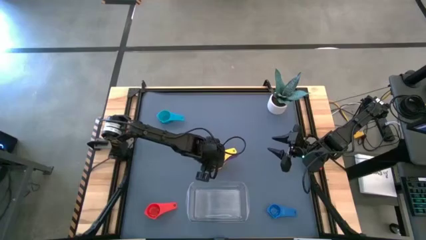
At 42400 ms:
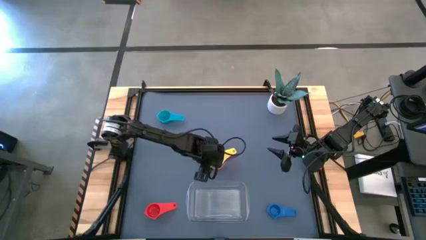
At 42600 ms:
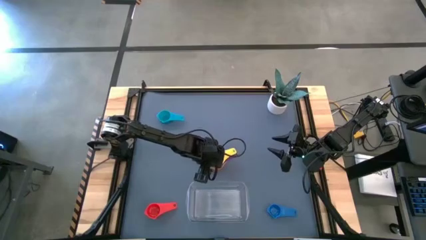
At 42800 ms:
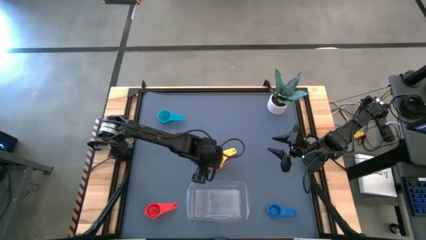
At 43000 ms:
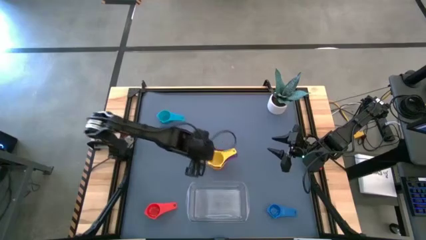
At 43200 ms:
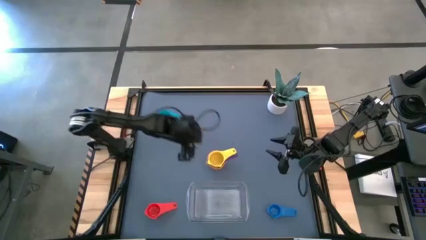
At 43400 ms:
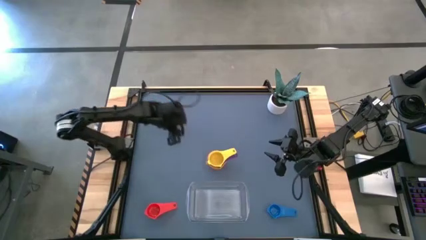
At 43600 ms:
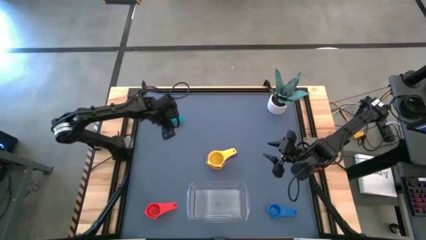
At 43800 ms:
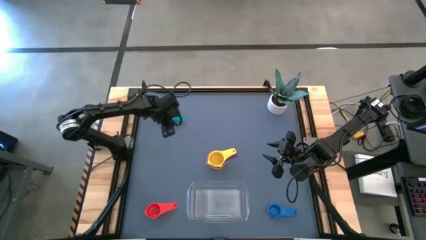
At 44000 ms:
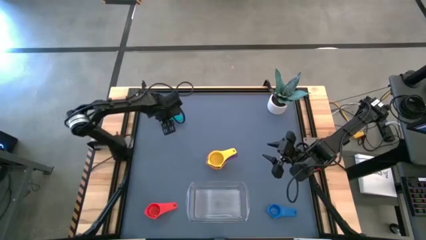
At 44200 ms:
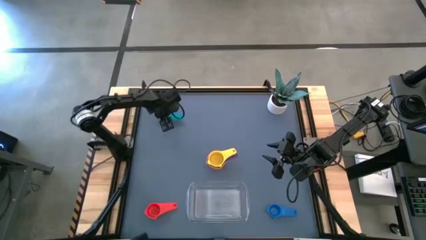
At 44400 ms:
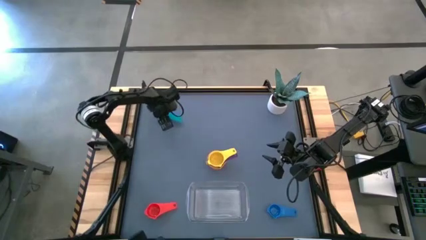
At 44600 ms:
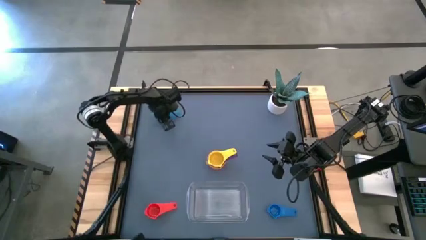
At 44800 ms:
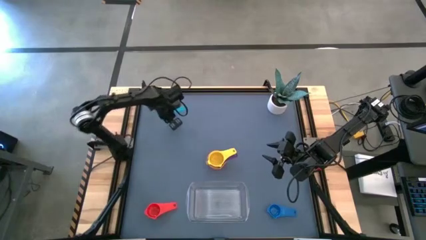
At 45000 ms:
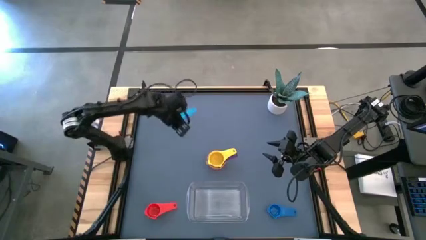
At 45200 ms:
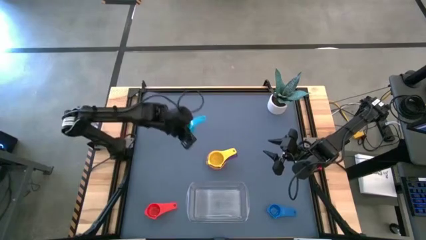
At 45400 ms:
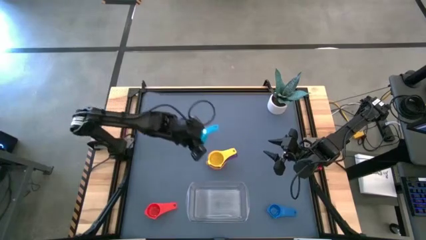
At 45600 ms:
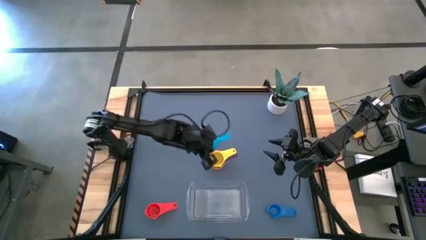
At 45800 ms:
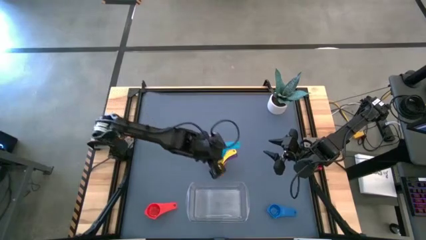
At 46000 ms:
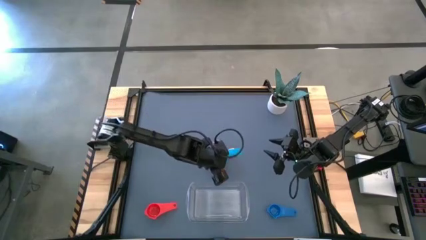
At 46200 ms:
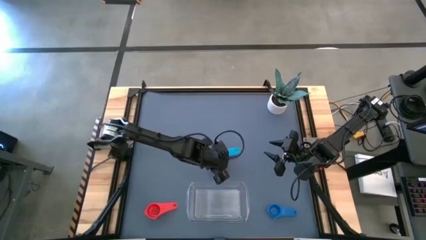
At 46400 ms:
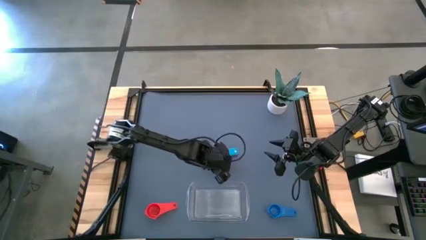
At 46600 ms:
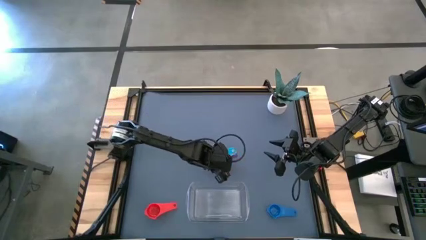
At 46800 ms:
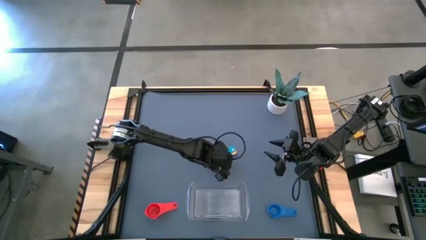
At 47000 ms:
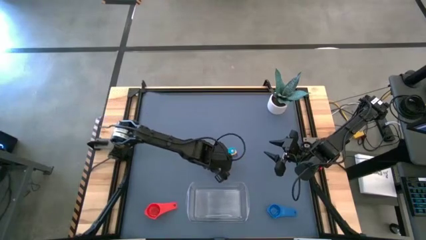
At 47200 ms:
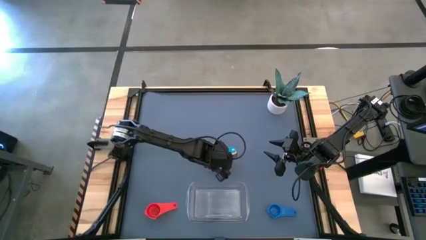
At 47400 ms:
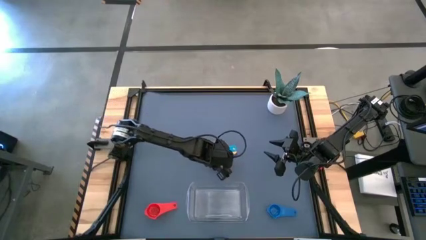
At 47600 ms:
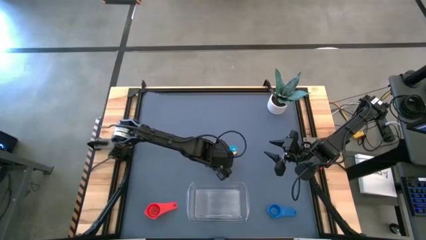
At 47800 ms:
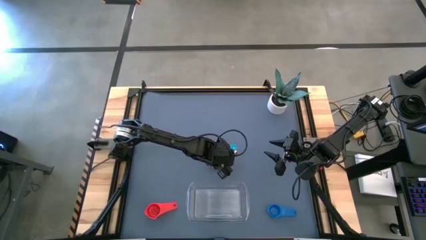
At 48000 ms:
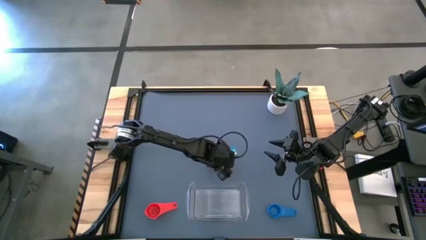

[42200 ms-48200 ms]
Task: Nest measuring cups in basket
Stack the light blue measuring cup on the yellow measuring cup

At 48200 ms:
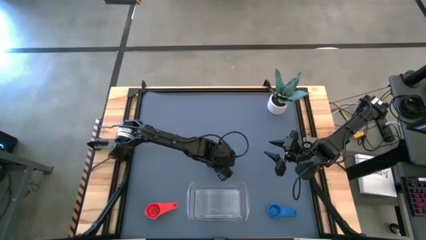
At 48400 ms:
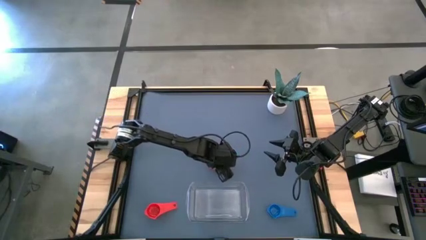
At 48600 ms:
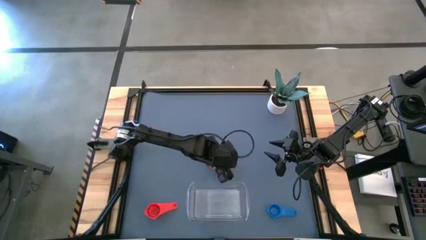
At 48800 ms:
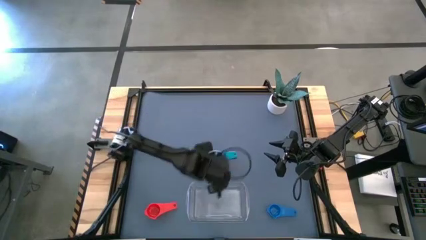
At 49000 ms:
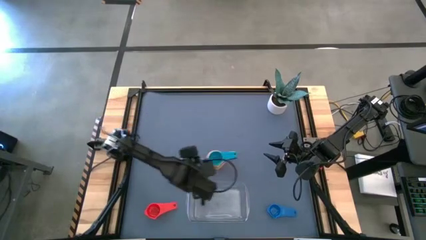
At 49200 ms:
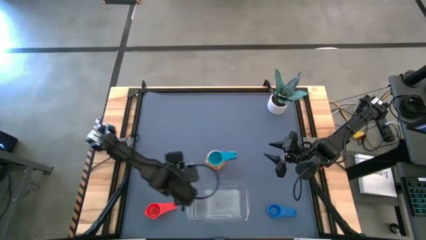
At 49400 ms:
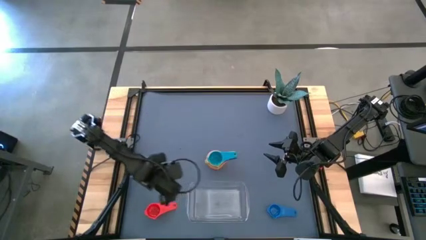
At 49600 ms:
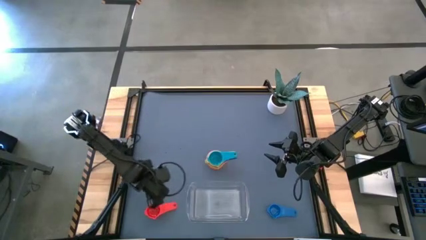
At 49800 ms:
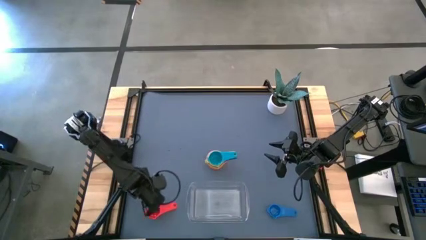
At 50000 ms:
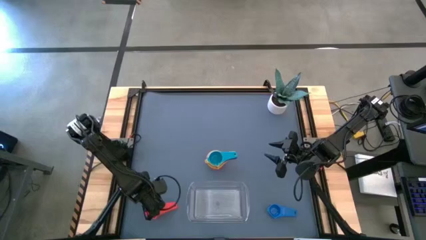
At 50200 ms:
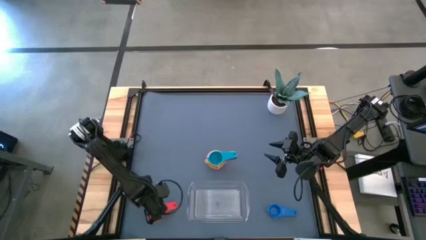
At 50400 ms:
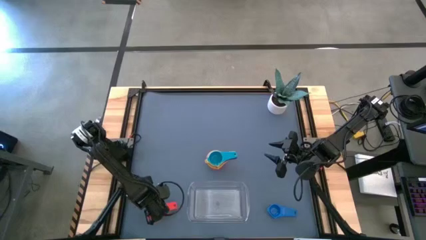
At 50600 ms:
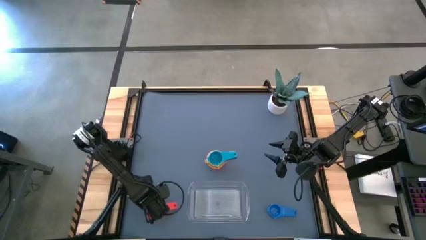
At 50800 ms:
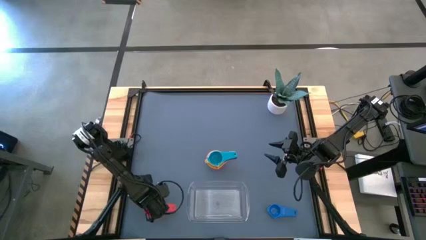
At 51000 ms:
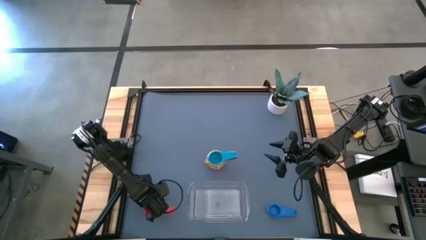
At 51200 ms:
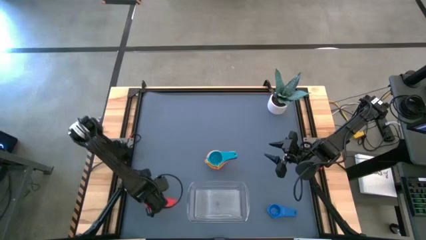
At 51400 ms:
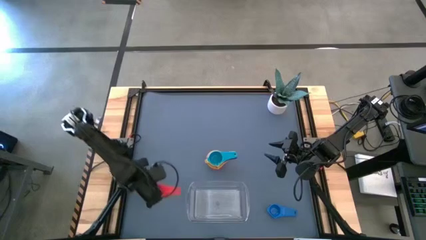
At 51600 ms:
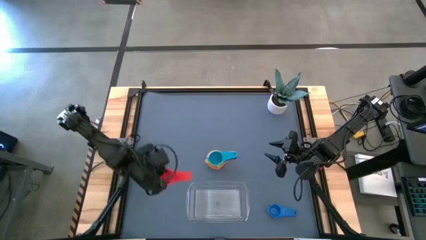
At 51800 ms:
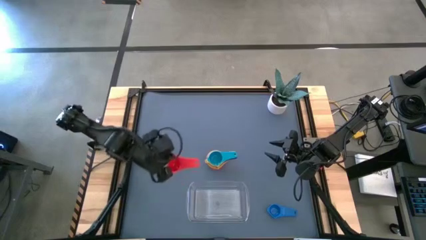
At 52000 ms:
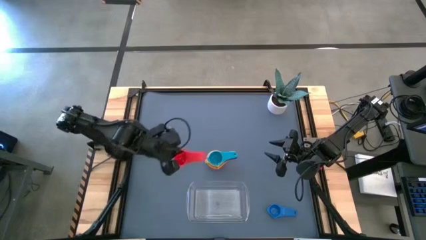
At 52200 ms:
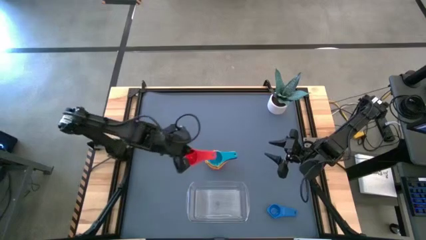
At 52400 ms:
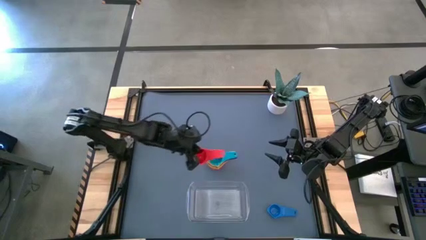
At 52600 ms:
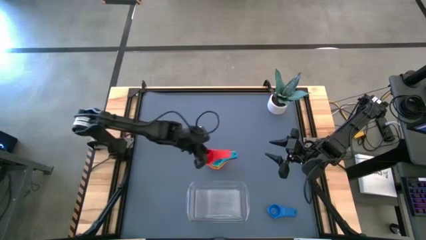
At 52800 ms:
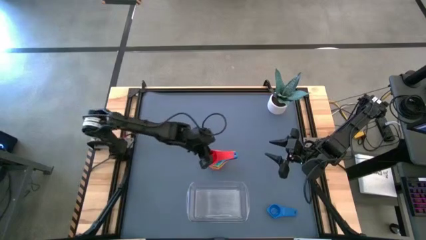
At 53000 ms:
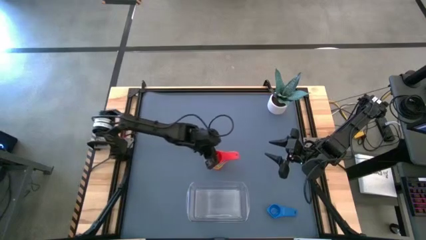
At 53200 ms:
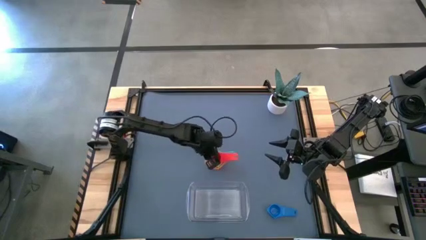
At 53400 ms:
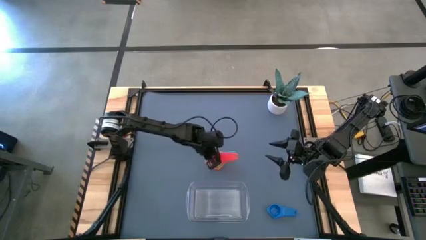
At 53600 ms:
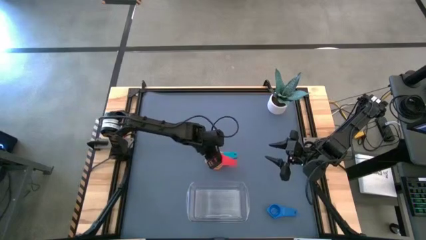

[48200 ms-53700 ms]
Stack the red measuring cup on the light blue measuring cup

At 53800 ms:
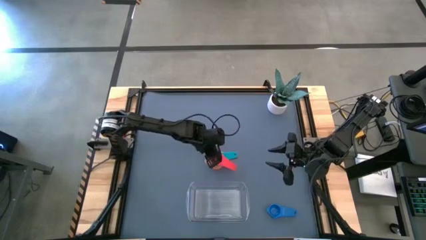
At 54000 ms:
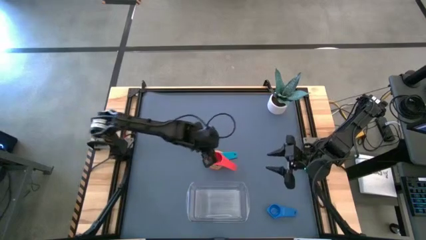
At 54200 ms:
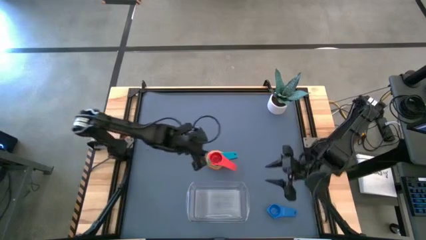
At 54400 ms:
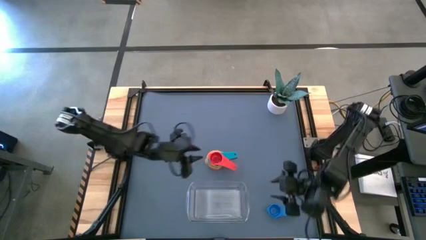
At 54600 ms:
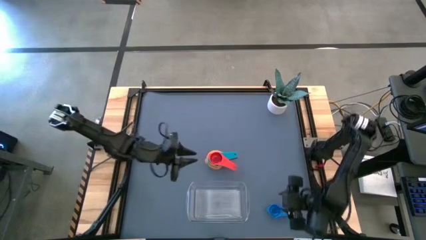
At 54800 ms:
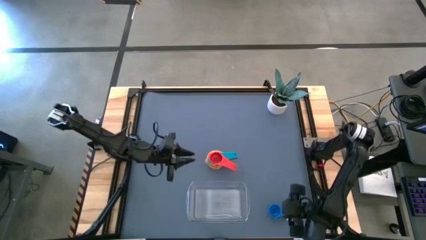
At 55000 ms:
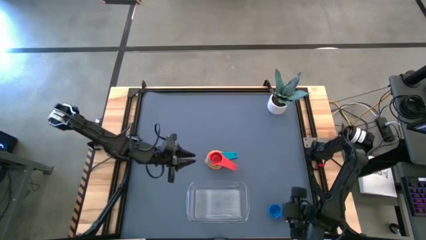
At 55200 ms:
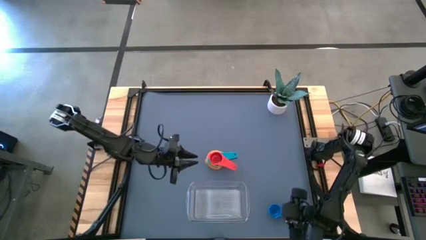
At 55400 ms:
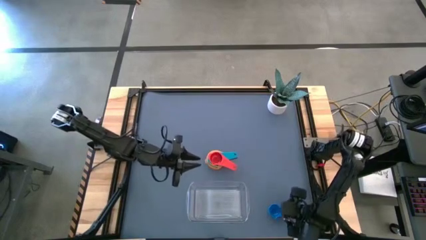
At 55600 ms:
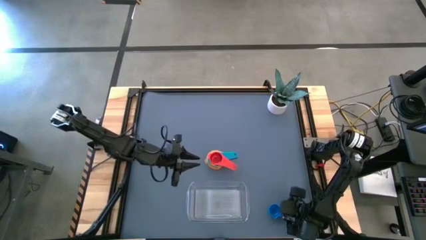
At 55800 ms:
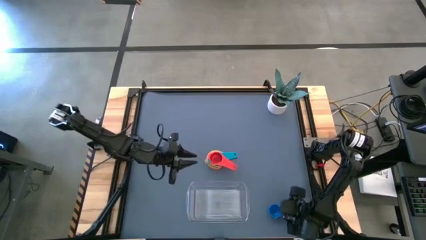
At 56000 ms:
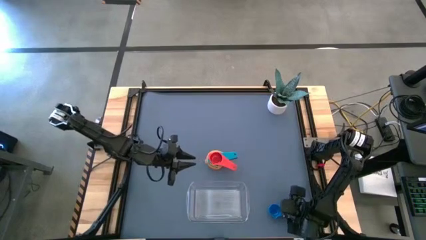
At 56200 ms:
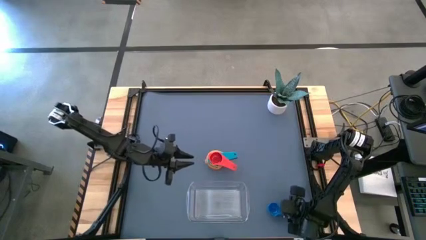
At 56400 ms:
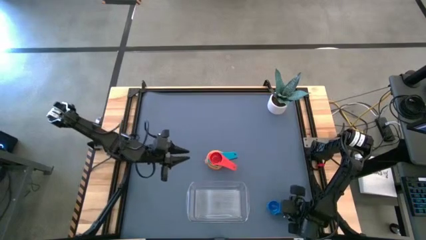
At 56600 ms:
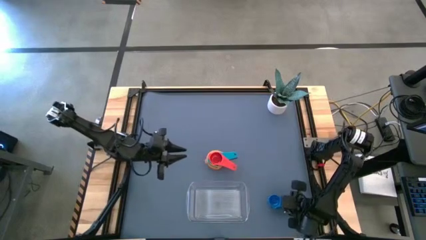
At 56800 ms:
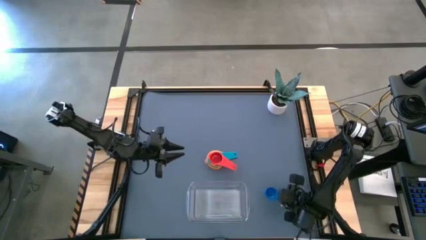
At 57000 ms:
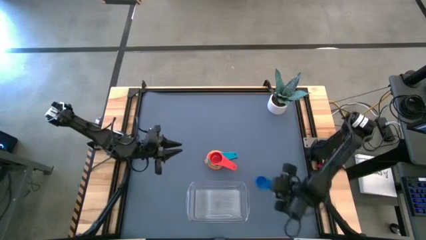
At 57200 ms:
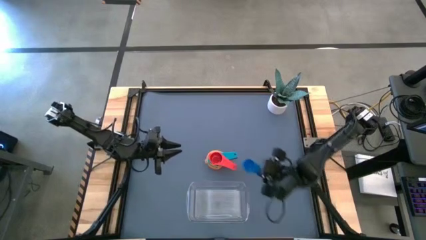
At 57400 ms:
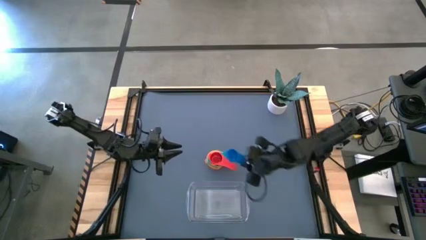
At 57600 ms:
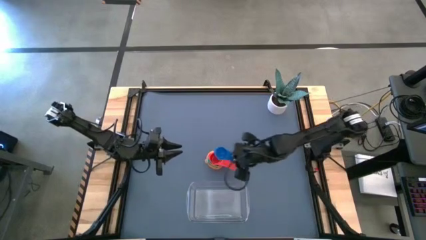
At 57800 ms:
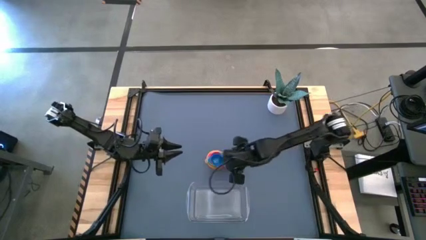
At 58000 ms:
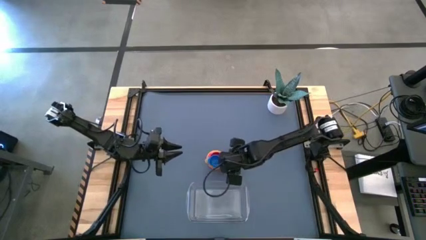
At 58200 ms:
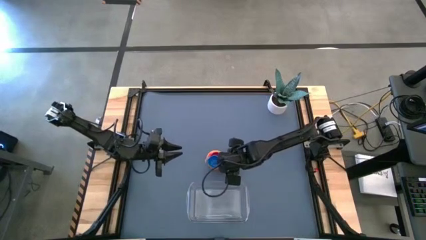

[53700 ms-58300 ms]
Stack the blue measuring cup on the red measuring cup
